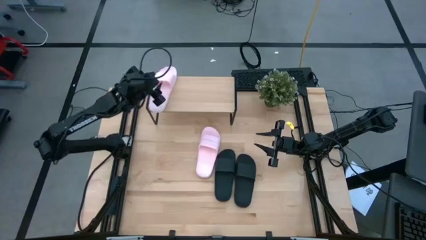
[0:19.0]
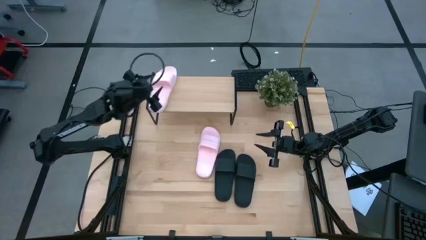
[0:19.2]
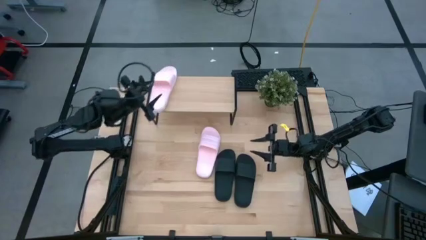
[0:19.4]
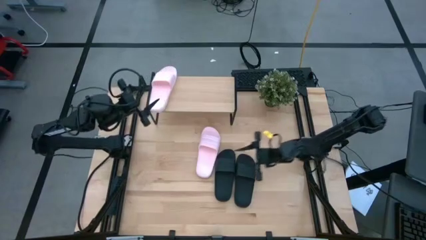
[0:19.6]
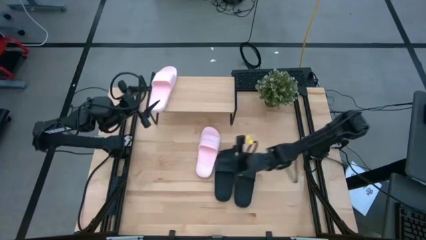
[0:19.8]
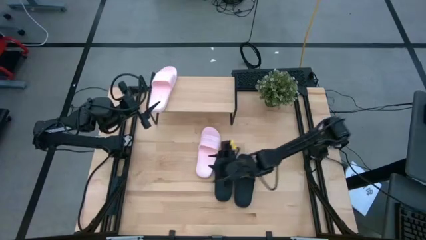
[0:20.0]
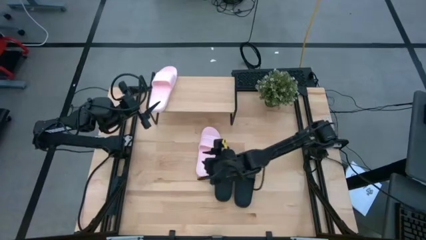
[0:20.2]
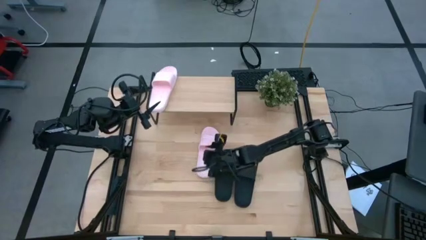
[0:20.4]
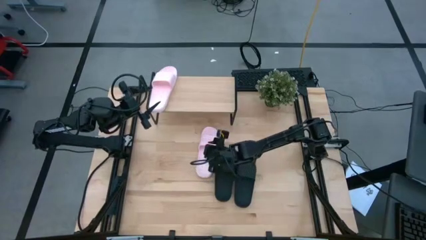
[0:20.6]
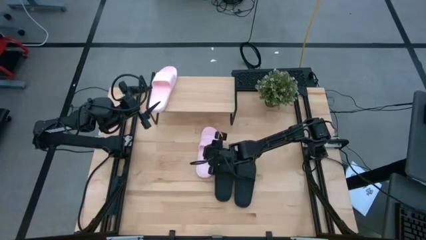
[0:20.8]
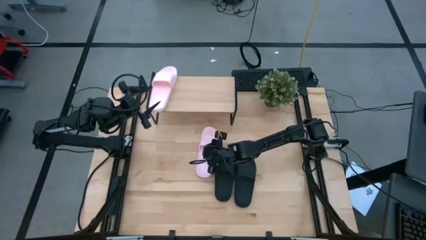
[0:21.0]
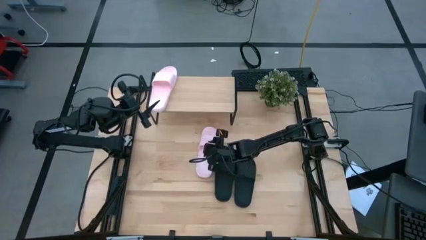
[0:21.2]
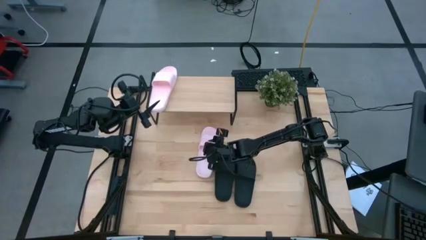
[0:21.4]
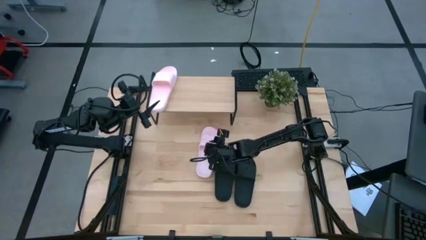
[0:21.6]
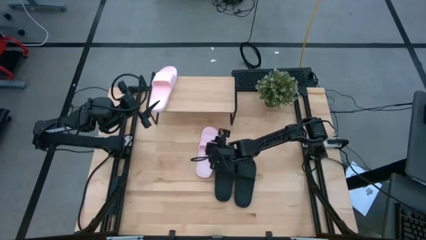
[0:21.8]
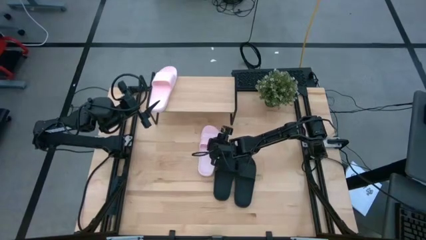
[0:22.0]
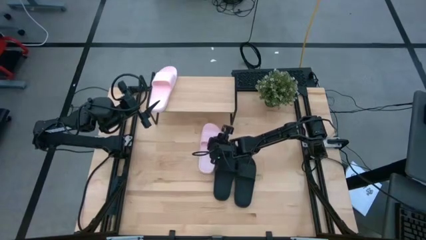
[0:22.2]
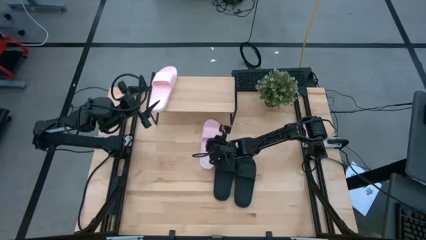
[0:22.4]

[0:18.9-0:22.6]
Task: Pick and place slides into the shelf
Put the pink slide on the shelf

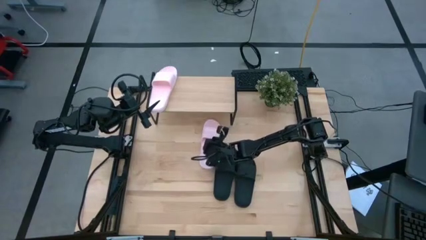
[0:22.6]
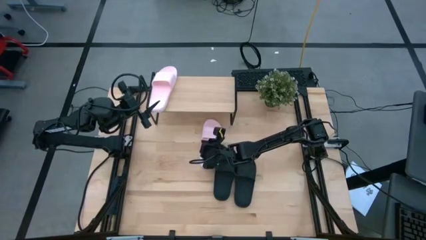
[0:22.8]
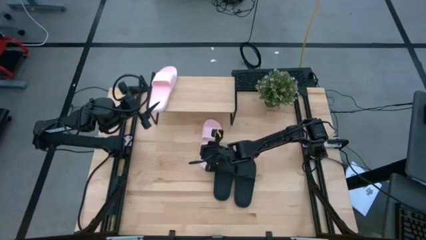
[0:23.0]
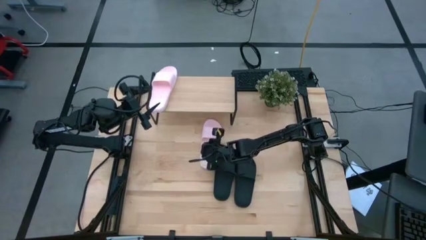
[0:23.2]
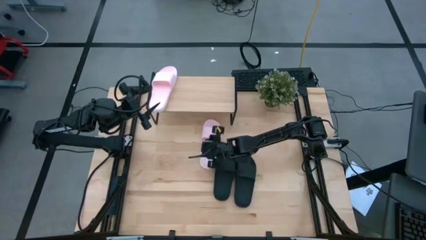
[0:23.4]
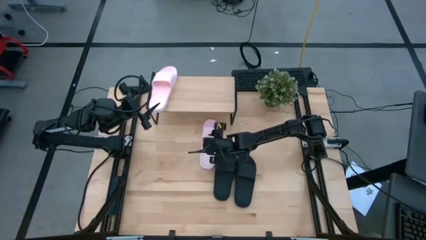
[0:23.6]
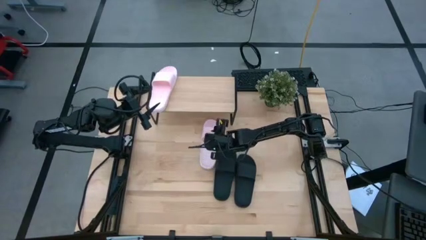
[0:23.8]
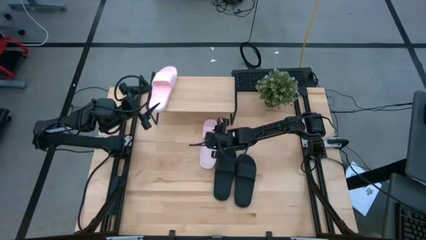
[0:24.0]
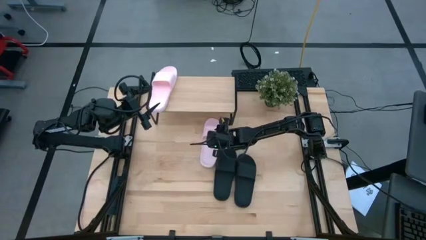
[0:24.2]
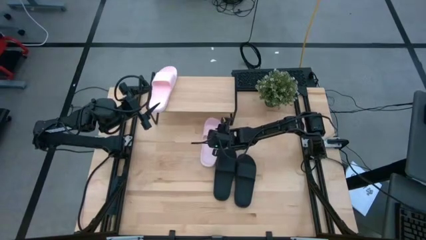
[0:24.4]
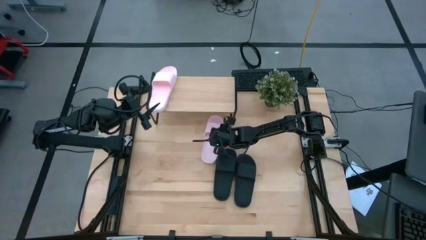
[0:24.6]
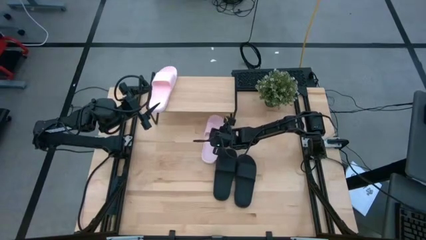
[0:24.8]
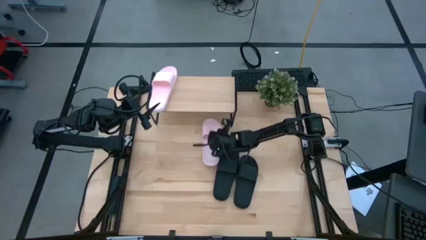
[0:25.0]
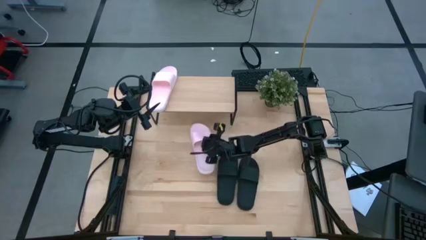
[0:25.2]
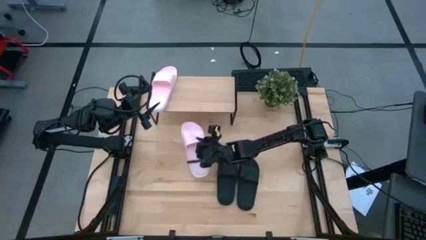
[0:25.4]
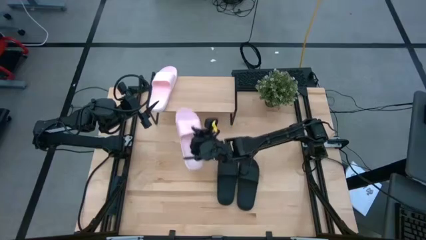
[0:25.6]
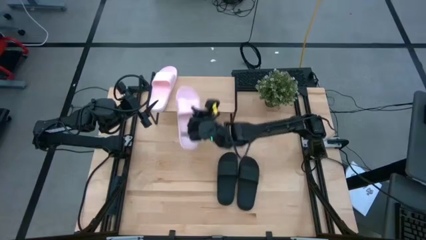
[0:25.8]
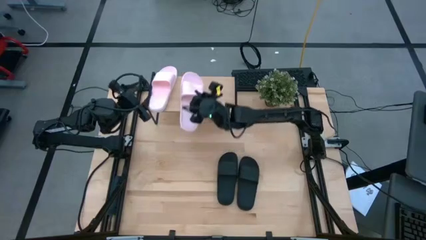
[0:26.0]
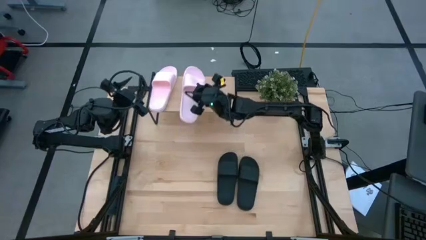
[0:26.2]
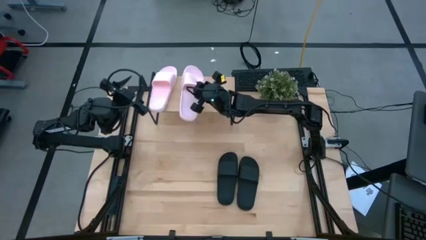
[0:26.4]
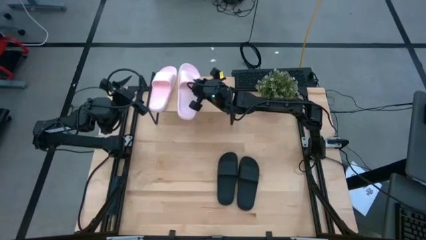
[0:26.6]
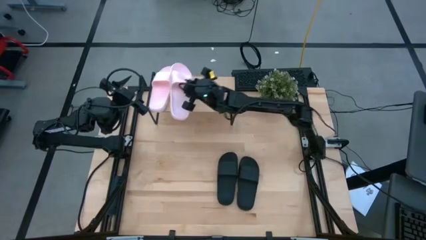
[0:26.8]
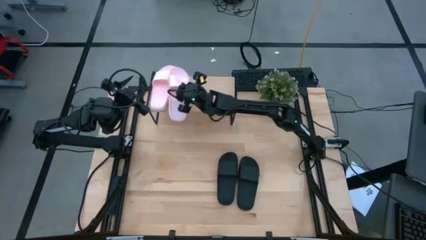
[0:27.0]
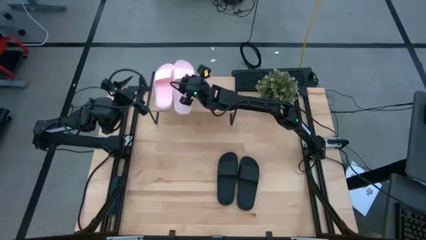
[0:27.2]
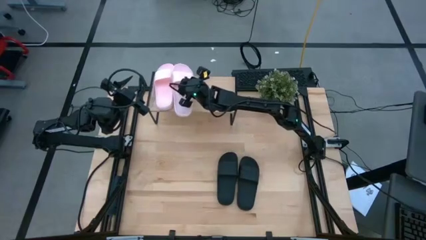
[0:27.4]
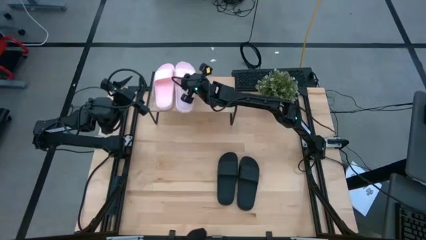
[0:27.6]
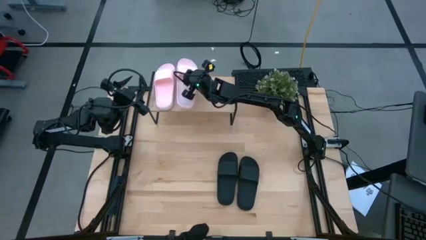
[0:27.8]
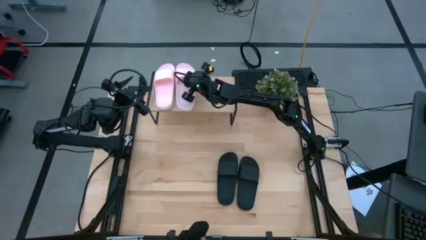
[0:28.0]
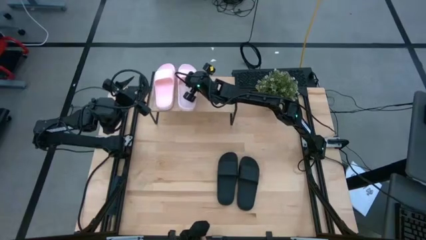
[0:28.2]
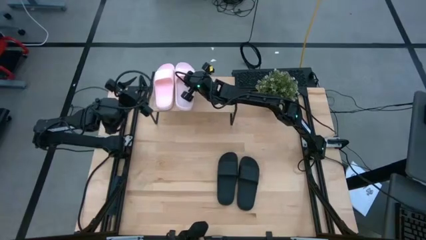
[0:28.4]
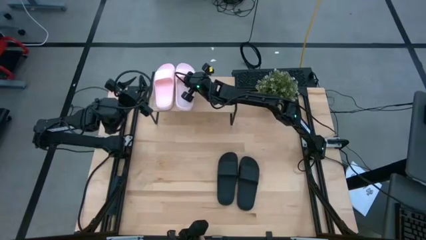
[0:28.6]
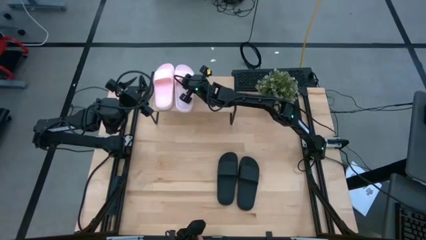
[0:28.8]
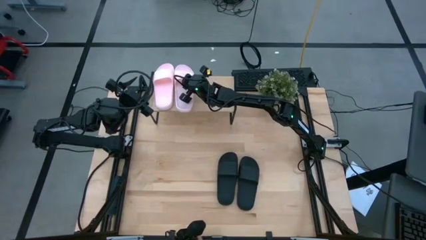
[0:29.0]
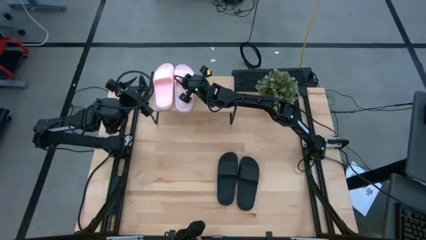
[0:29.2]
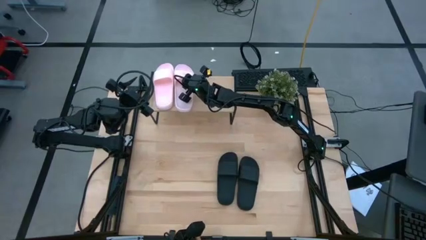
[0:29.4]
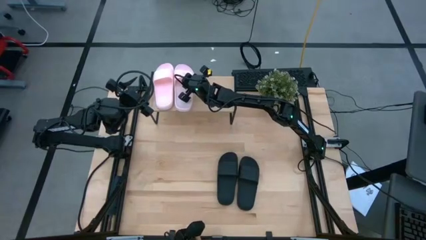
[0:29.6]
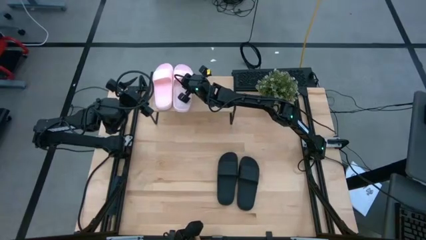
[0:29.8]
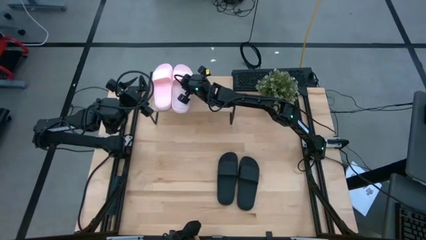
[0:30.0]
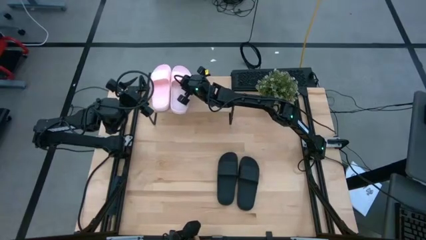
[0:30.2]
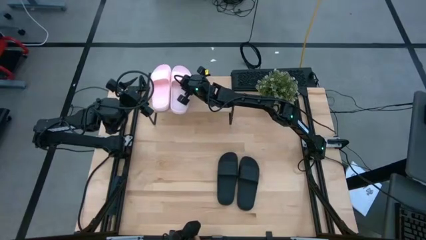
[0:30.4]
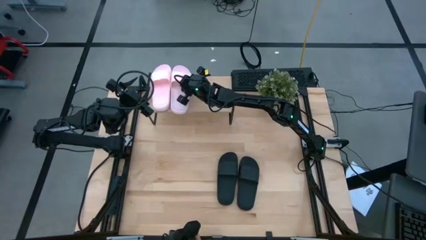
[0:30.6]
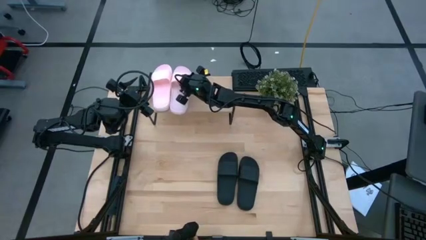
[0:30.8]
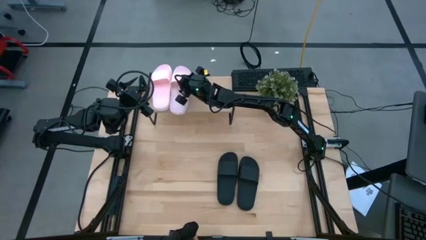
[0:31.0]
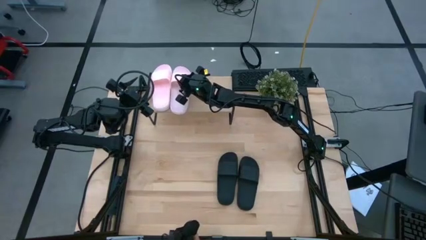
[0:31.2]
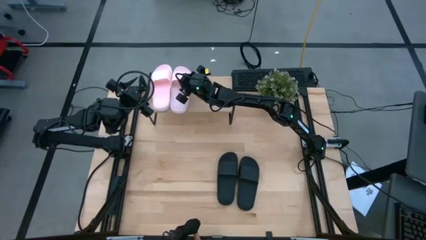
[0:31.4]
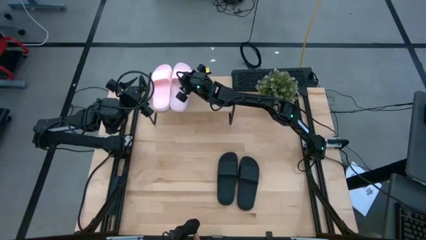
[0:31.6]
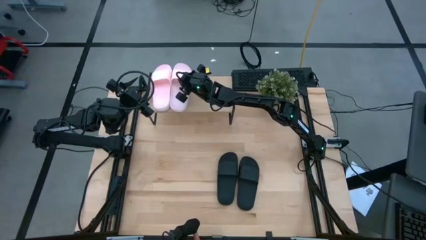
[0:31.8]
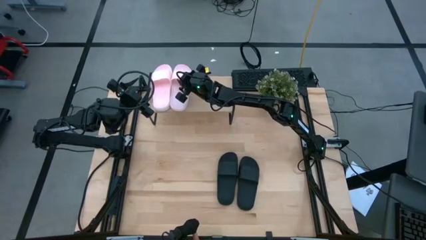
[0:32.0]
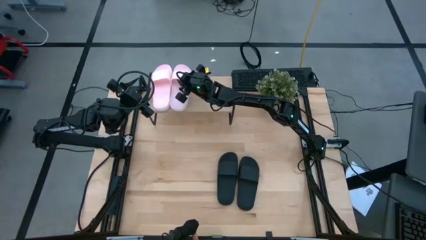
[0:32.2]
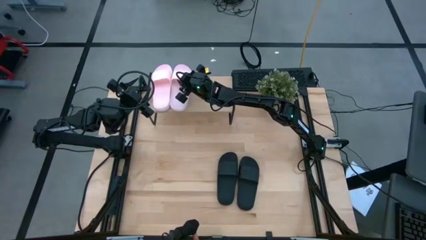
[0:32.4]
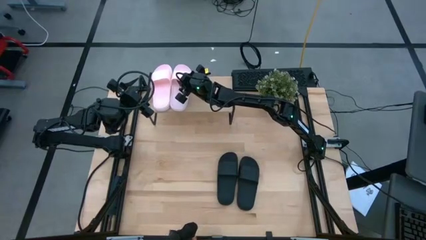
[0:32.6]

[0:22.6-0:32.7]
Put the pink slide on the shelf
